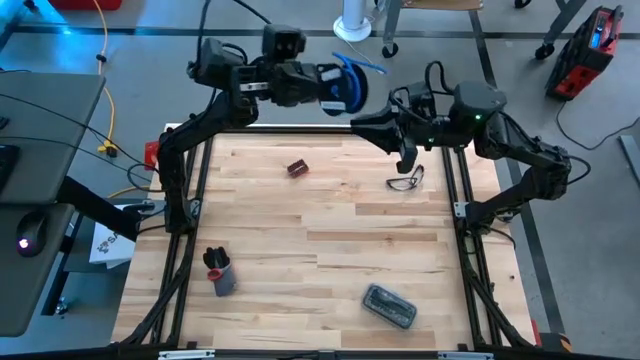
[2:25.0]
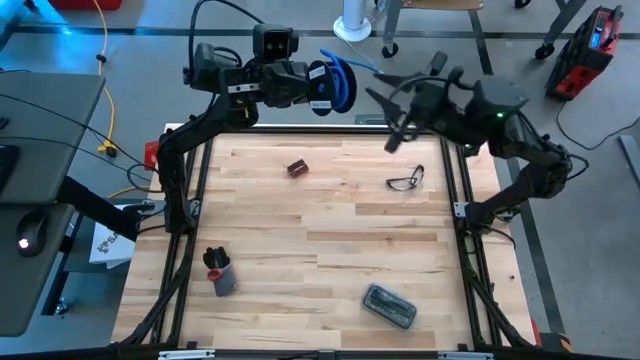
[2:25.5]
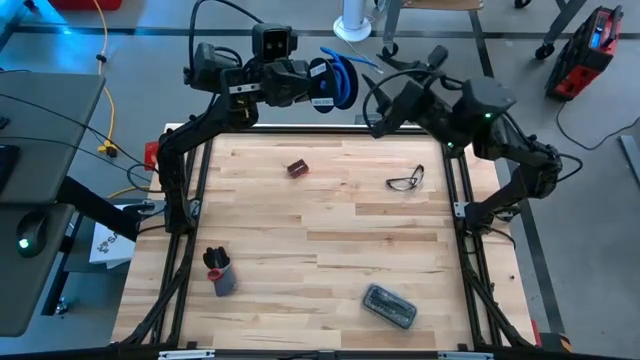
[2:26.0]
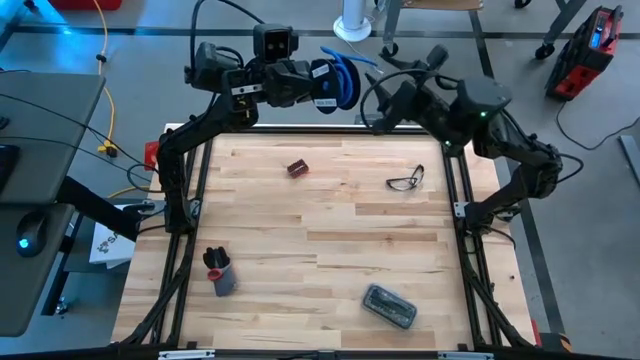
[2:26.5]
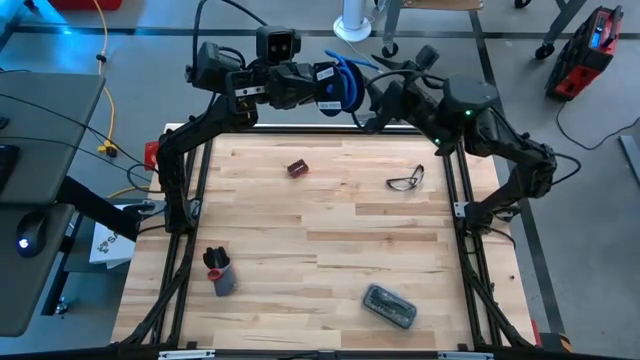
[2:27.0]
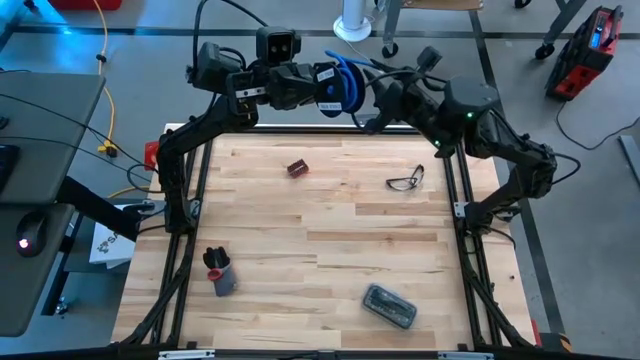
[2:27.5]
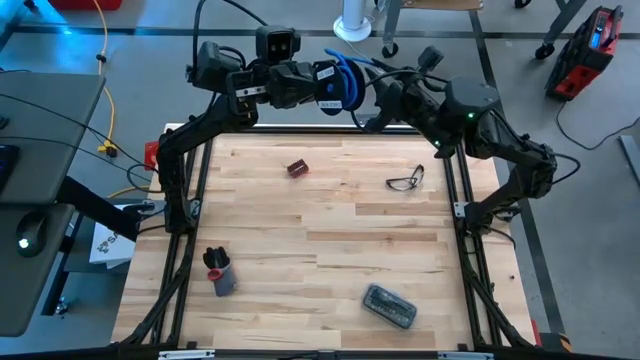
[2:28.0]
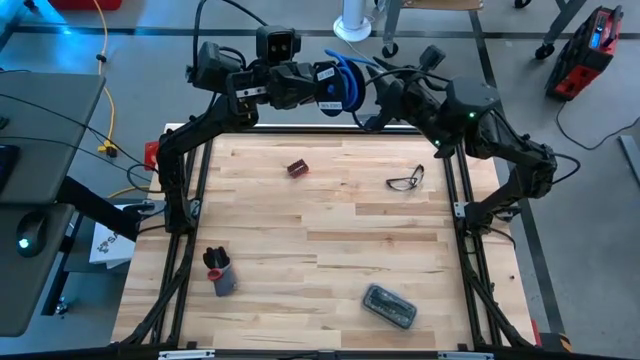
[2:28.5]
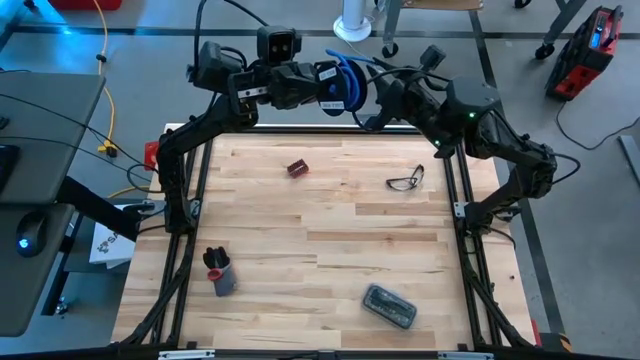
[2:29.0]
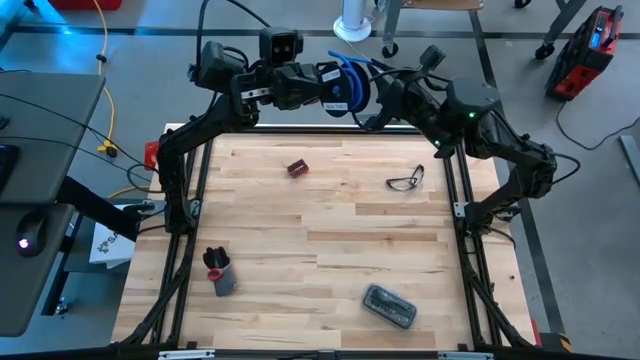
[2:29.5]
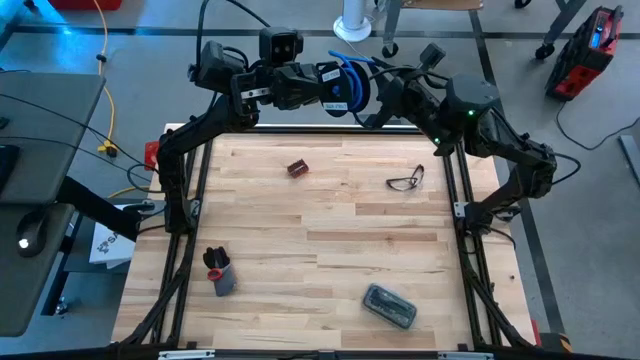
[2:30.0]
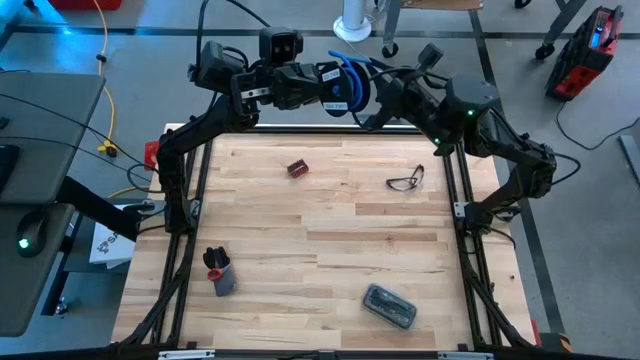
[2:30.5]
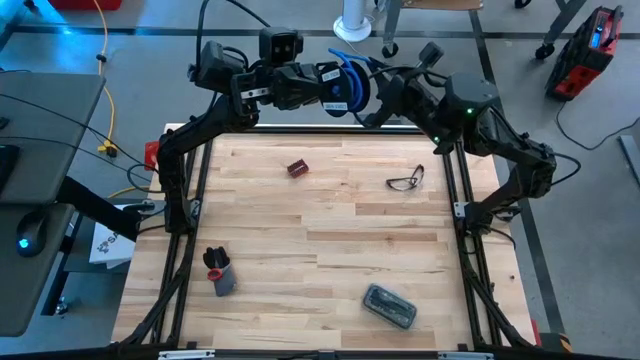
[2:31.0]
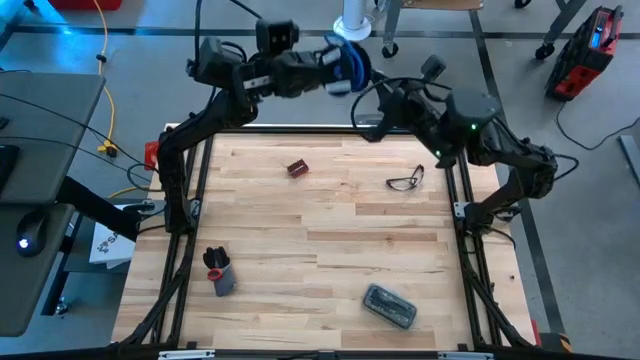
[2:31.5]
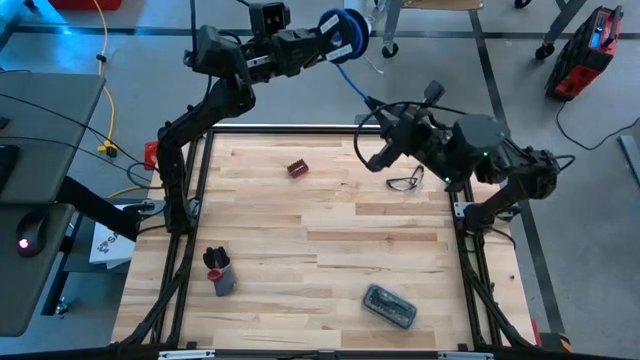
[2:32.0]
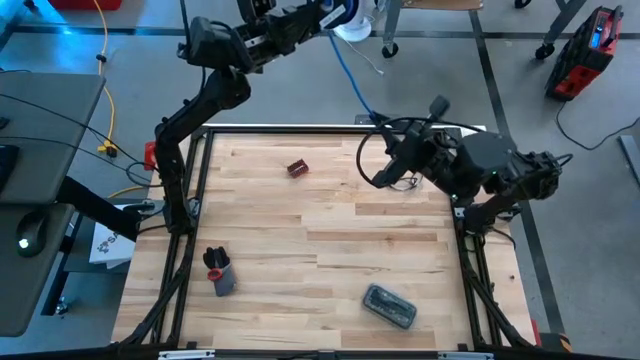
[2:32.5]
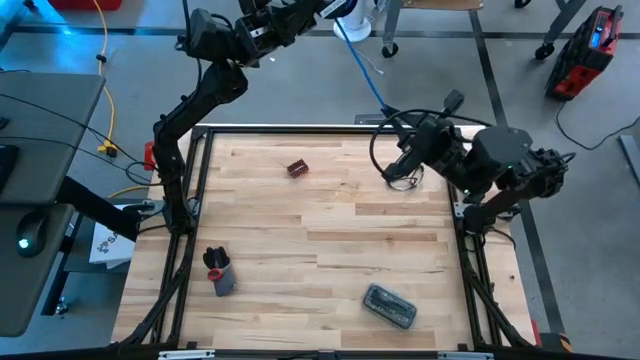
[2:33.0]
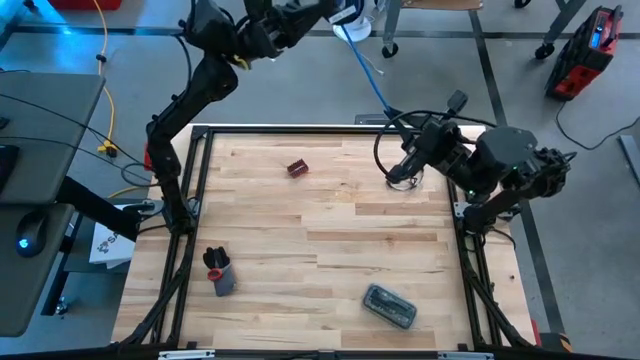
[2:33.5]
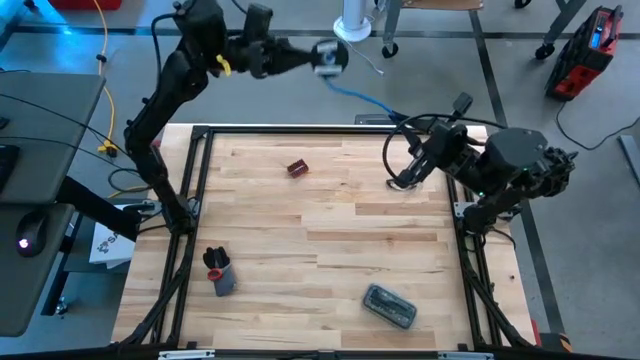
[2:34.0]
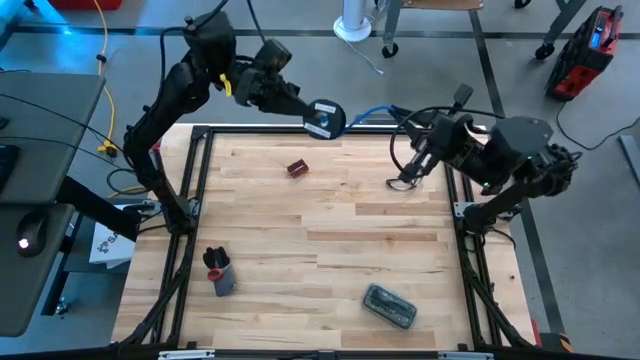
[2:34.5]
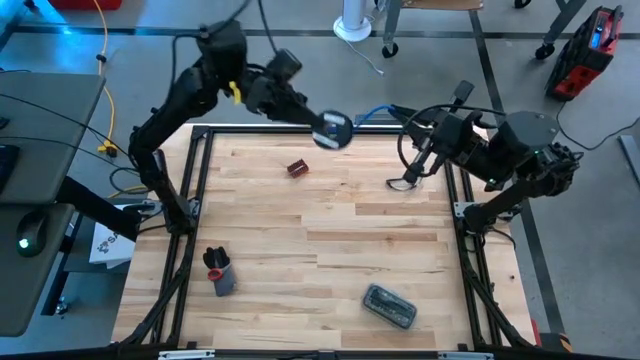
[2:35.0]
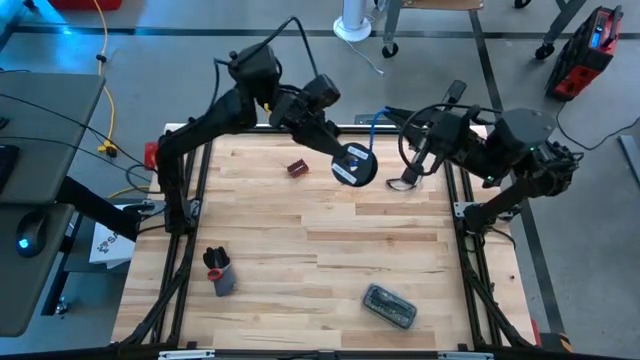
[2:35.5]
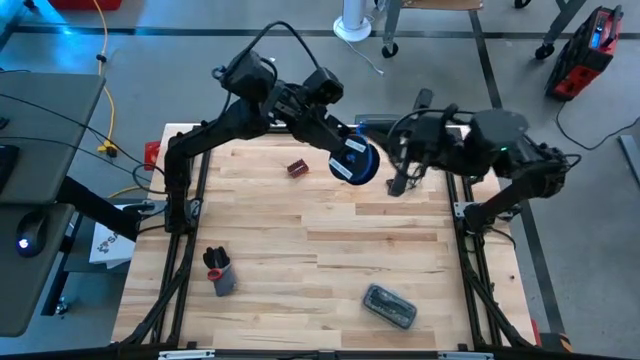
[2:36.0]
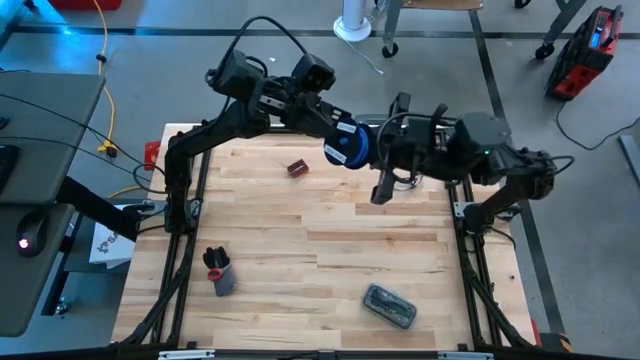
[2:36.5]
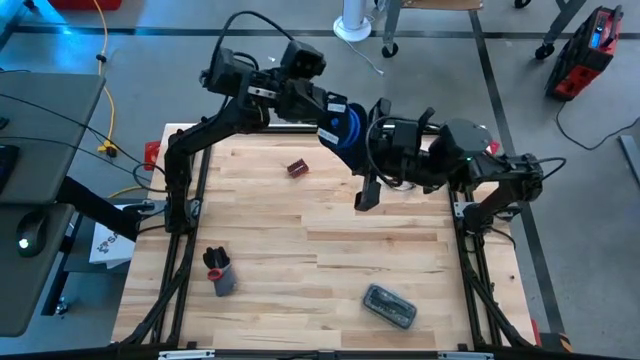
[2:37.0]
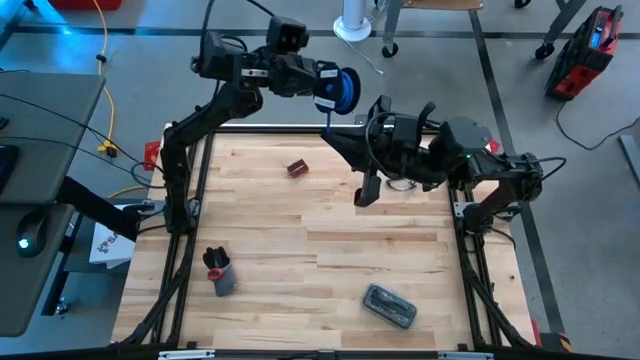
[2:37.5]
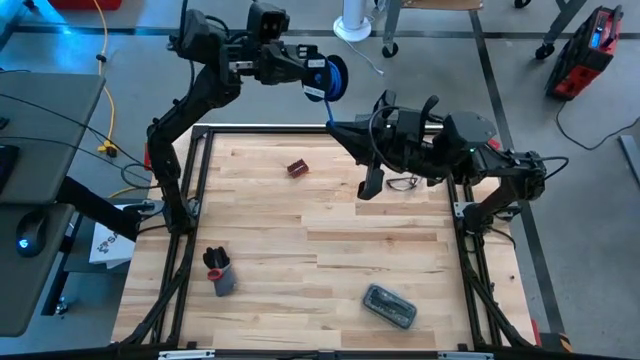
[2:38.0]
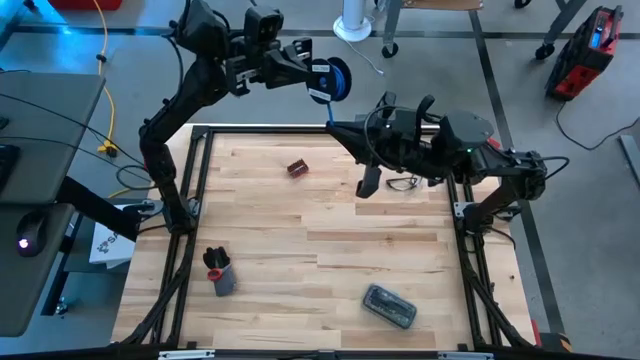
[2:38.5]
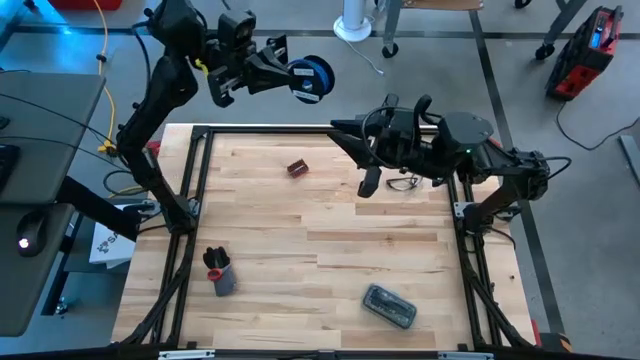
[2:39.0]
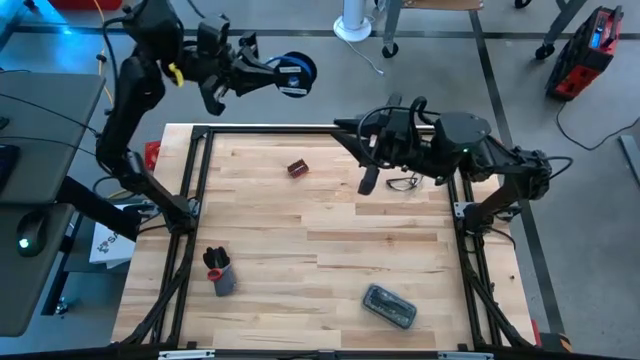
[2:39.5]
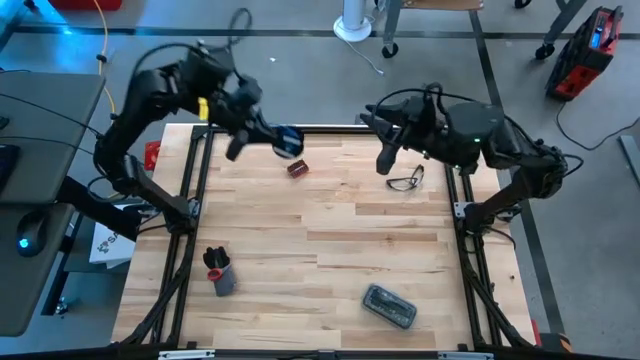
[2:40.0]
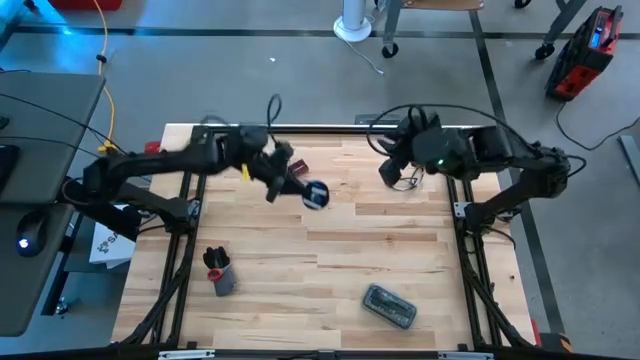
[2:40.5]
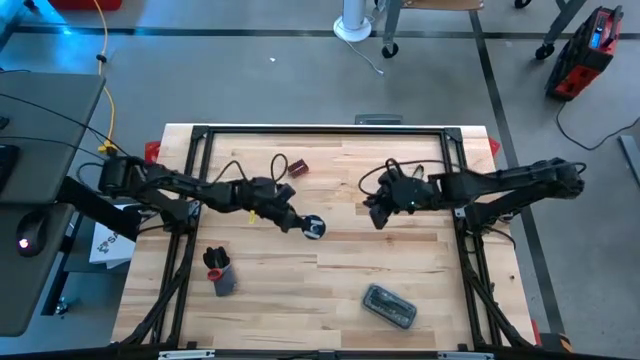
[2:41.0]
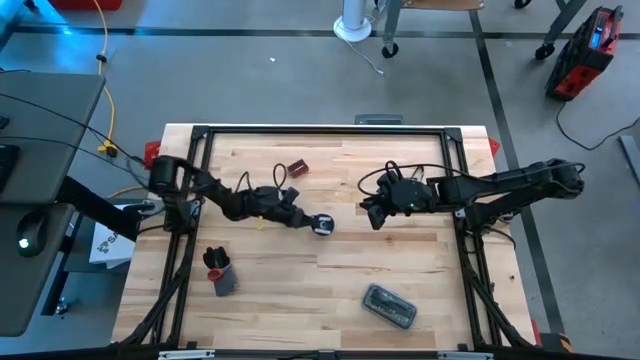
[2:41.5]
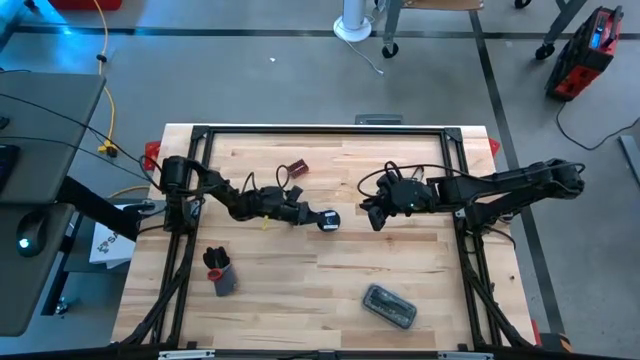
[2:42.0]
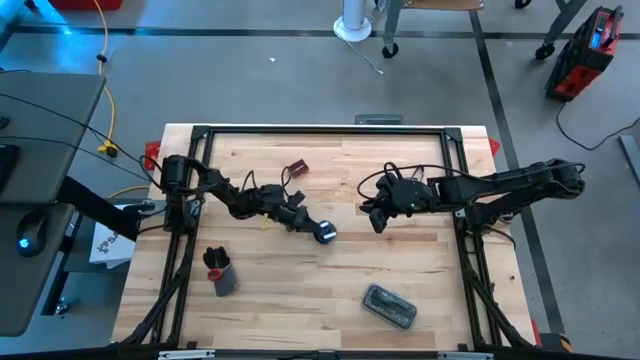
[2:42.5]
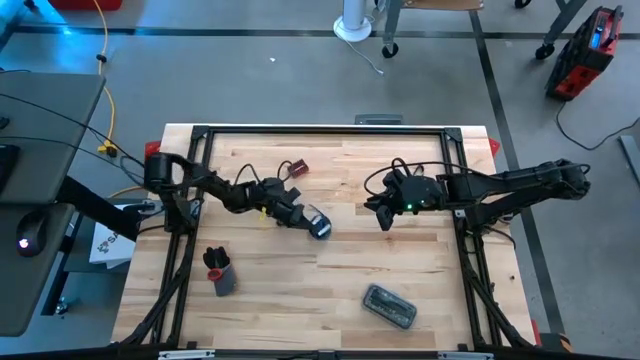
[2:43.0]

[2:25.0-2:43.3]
Task: Coil cords
Coil the blue wire onto the spool
